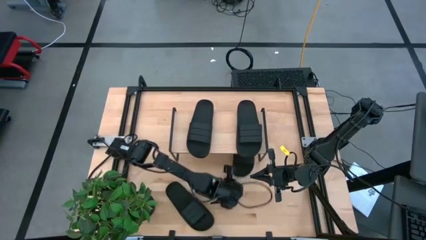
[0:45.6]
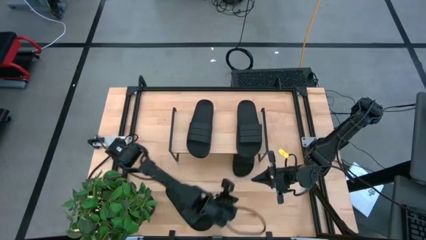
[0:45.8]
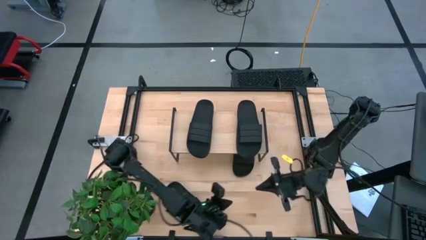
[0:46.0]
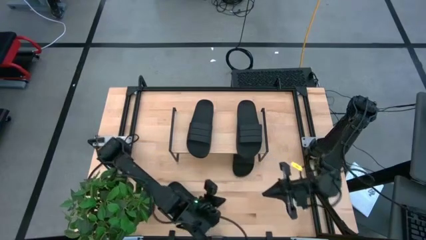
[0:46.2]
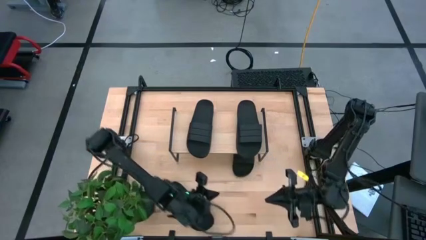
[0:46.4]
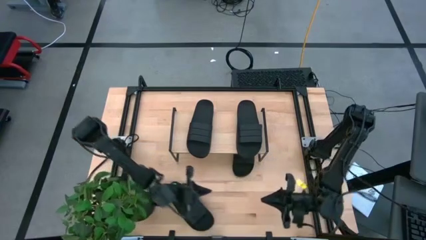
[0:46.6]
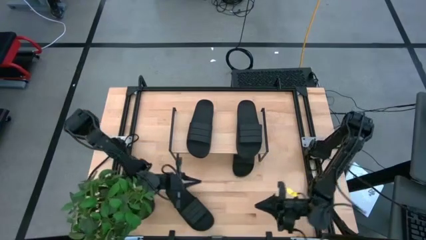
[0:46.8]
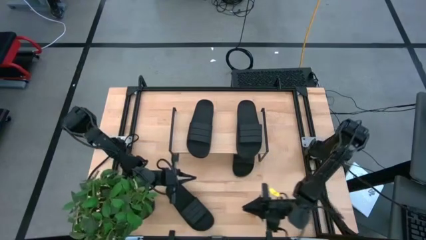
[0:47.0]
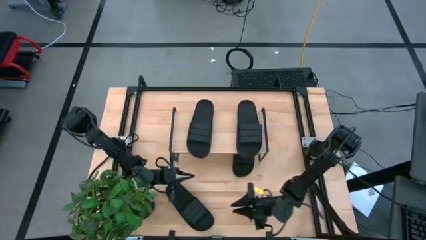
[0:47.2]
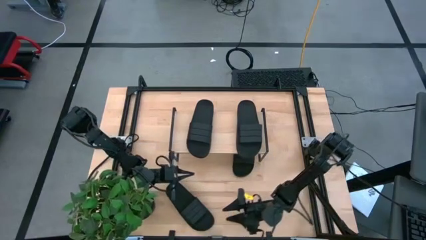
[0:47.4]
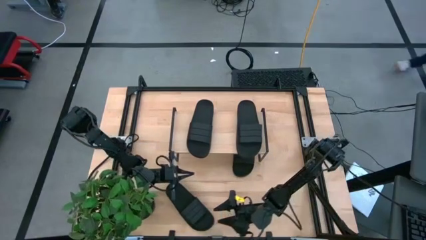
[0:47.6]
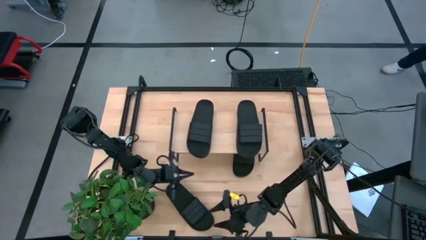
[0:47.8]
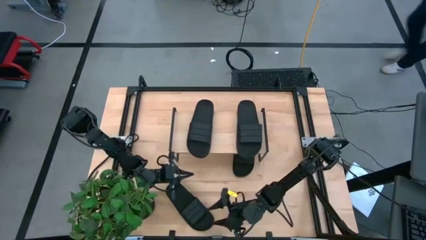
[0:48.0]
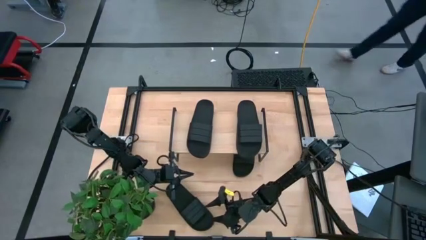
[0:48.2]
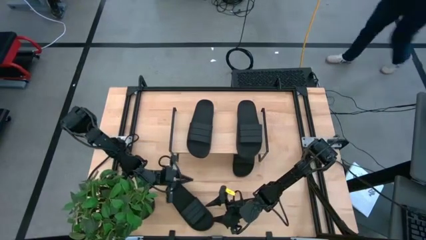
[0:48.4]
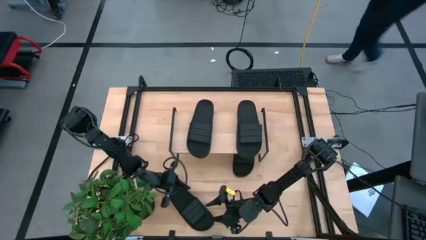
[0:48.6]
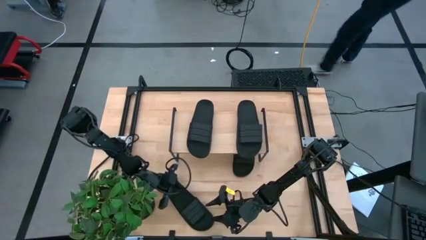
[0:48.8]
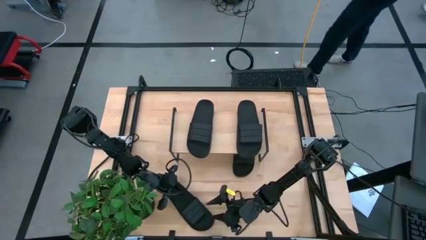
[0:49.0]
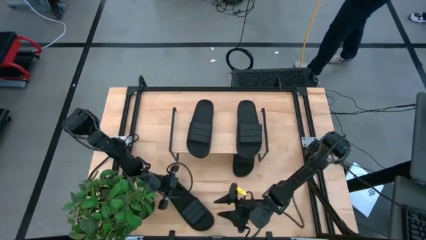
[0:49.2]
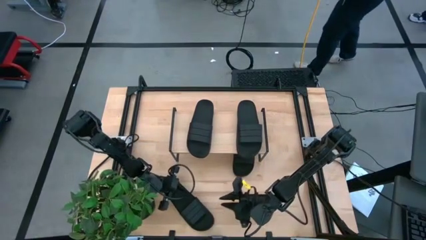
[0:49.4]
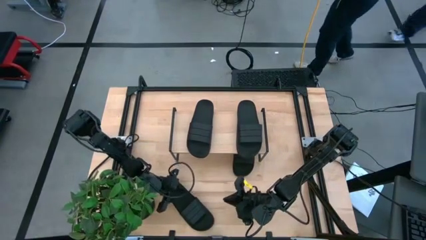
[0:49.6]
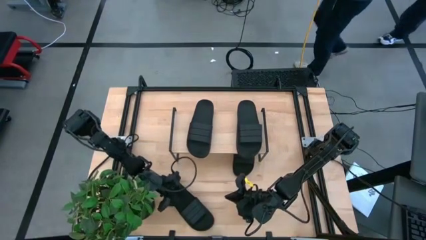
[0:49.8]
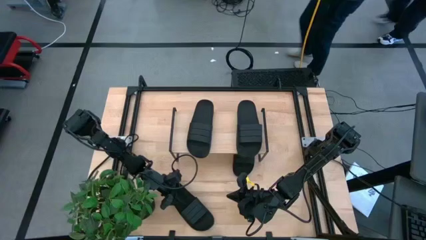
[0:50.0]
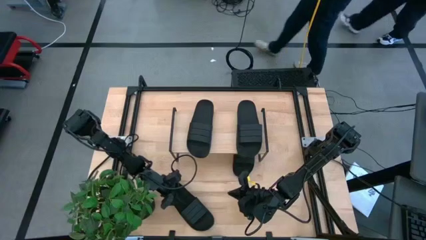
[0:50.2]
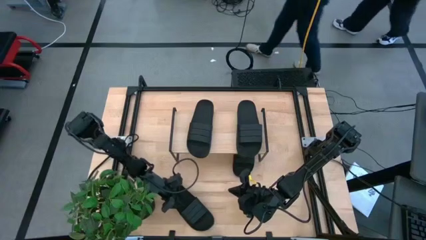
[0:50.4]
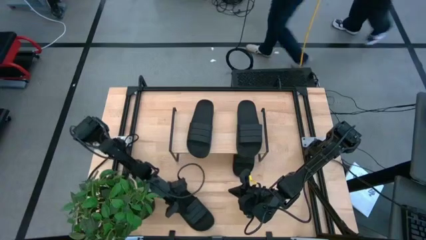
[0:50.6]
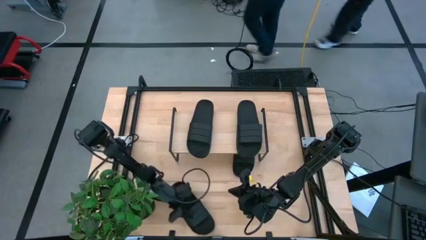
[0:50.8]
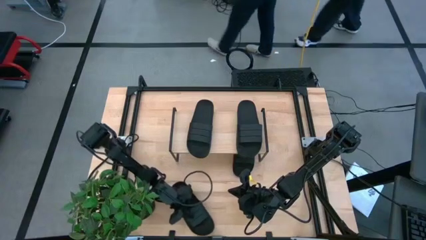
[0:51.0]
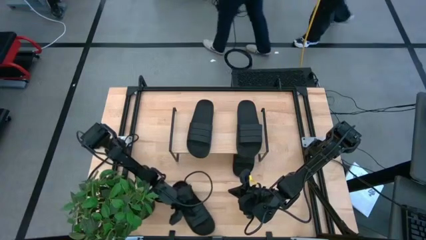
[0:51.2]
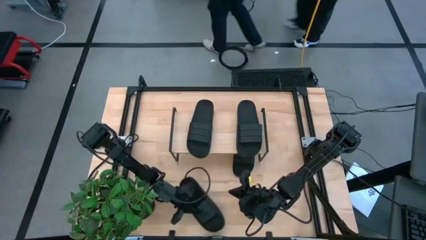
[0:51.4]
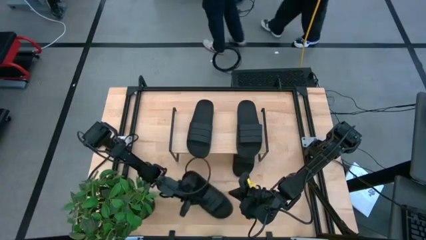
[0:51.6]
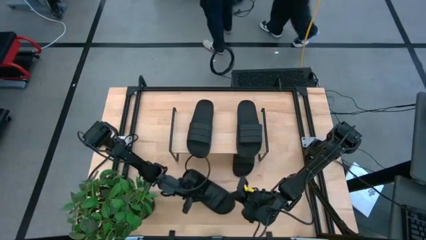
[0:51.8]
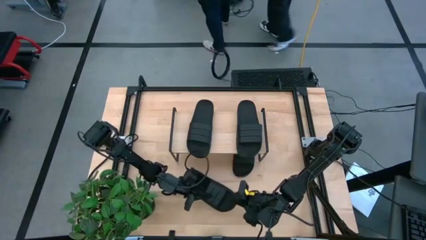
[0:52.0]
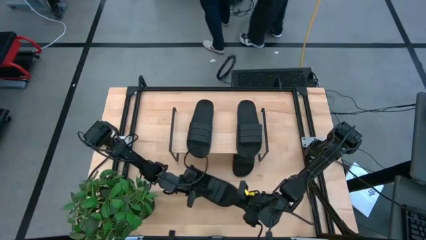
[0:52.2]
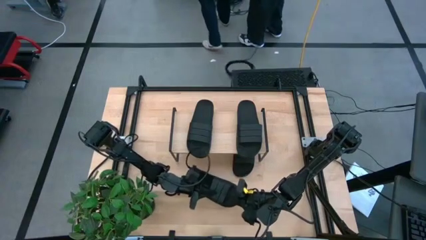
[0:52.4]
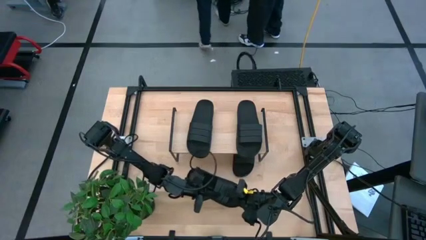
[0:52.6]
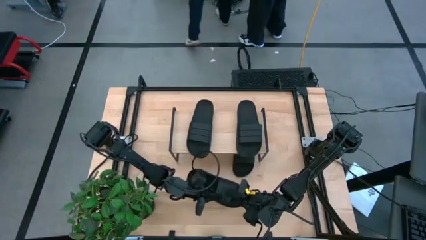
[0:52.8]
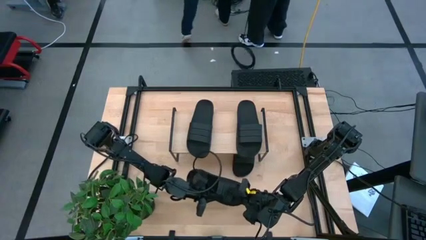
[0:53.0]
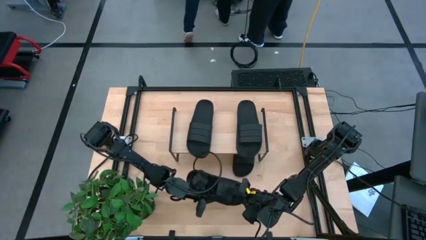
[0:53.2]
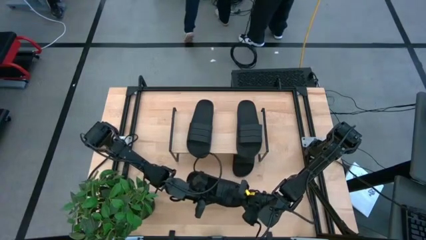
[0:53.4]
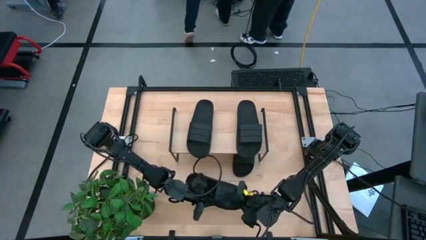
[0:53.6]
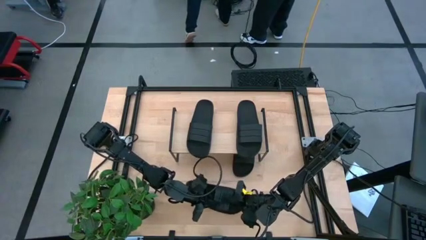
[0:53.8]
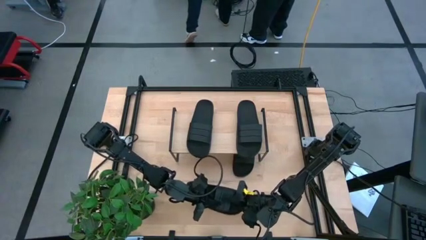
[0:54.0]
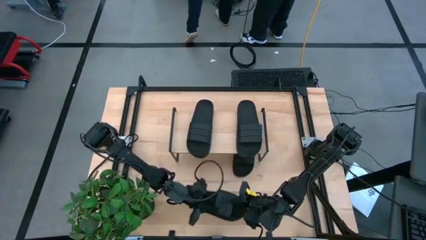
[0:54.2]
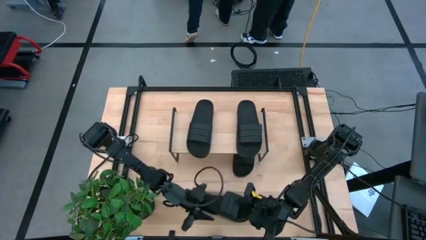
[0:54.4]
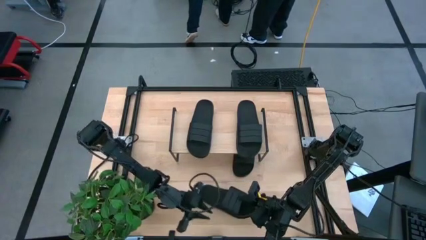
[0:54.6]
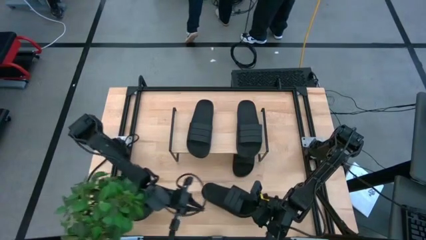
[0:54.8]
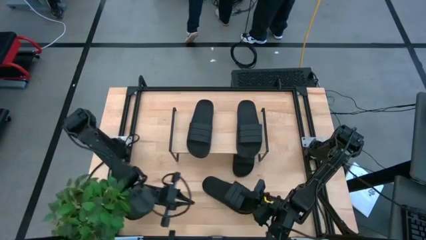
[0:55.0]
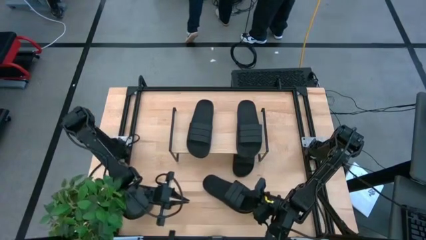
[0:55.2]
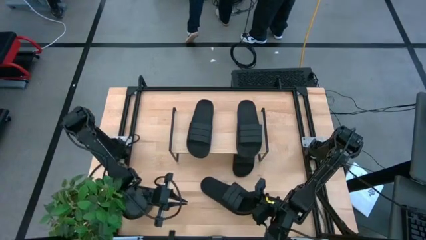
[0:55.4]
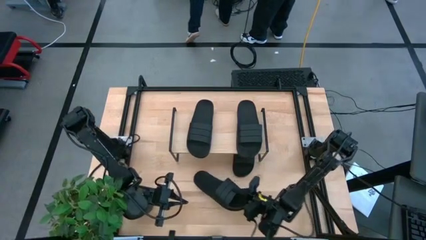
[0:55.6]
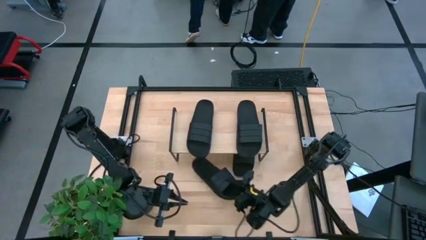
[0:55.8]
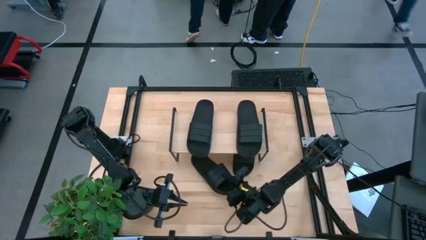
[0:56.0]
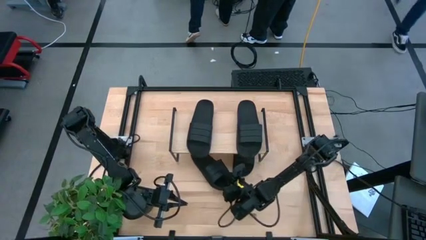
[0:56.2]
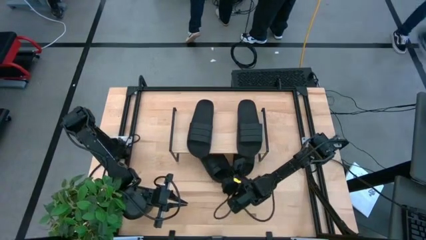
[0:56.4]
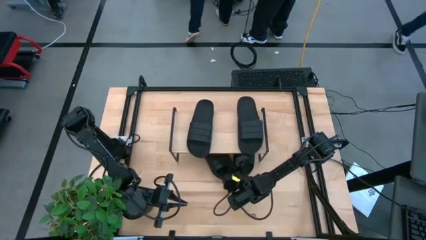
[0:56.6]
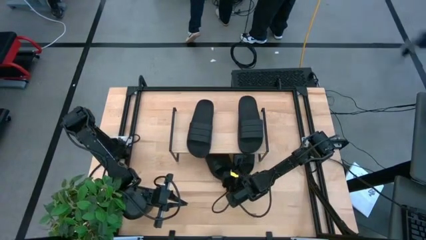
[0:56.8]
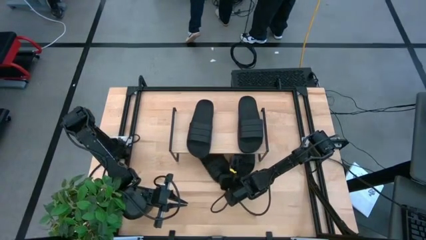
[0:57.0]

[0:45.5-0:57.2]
Task: Pick and place slides into the shelf
Put the slide under the shelf
